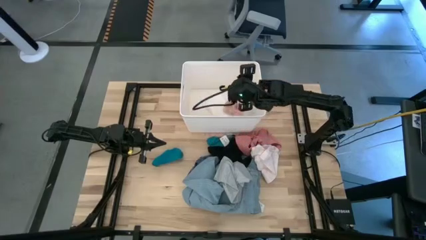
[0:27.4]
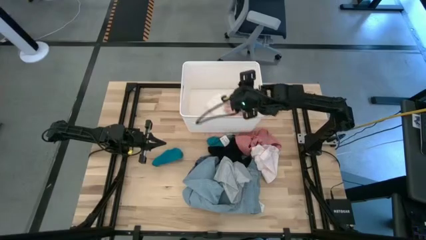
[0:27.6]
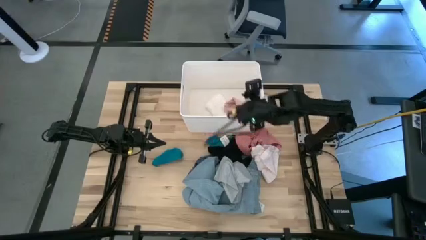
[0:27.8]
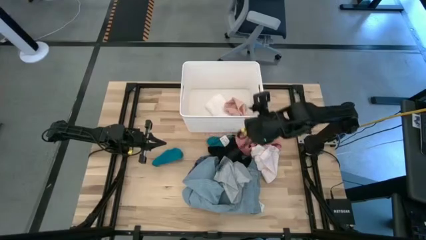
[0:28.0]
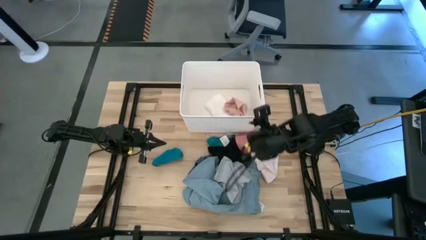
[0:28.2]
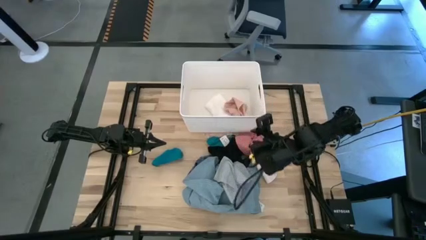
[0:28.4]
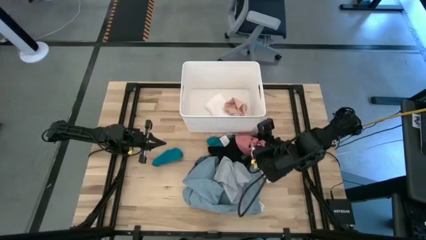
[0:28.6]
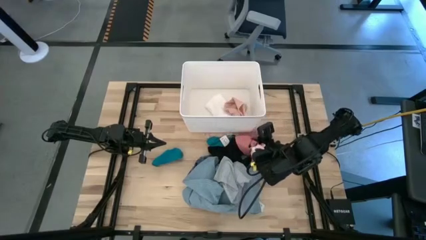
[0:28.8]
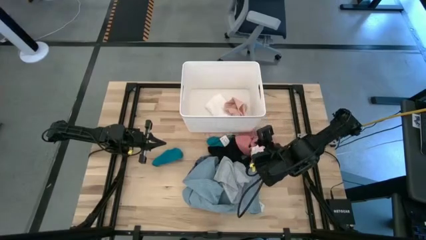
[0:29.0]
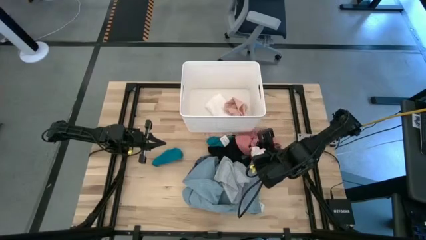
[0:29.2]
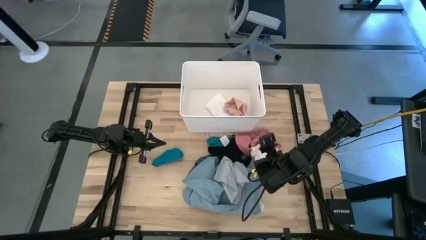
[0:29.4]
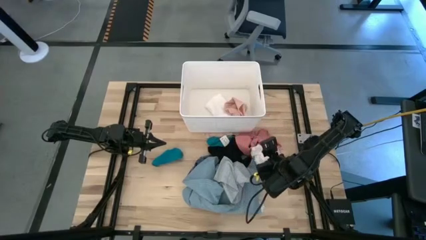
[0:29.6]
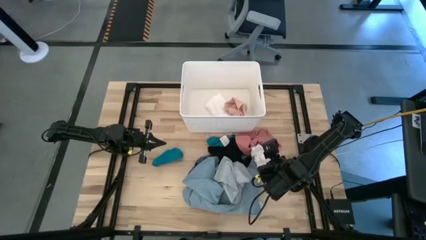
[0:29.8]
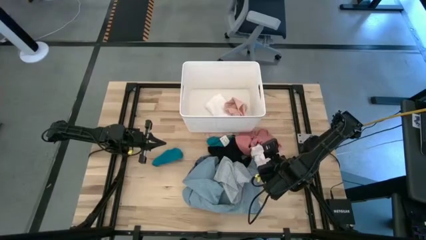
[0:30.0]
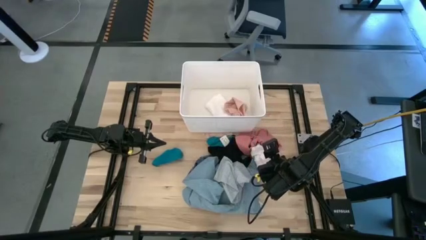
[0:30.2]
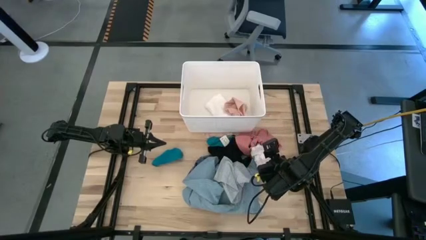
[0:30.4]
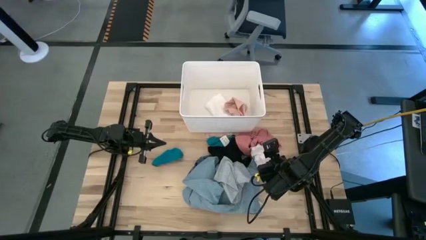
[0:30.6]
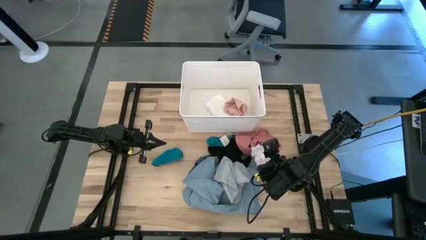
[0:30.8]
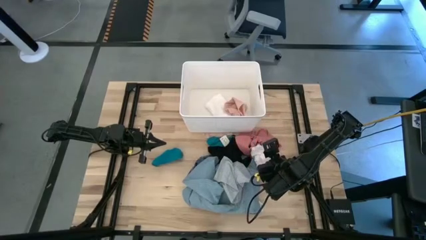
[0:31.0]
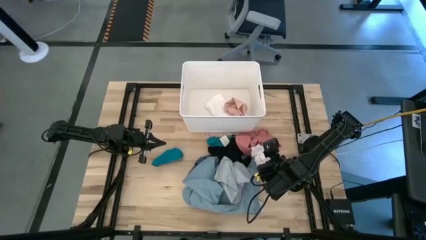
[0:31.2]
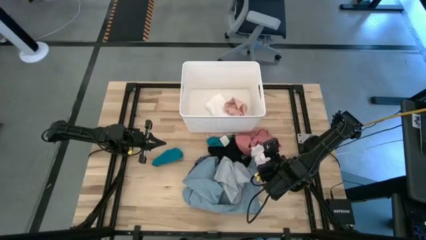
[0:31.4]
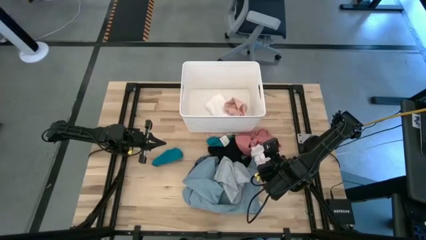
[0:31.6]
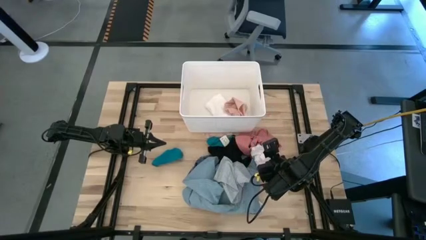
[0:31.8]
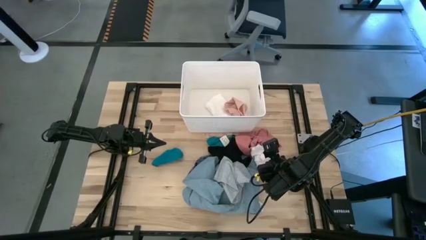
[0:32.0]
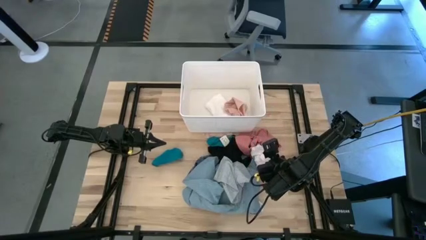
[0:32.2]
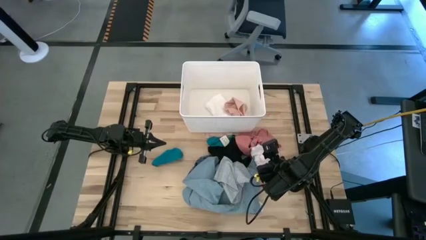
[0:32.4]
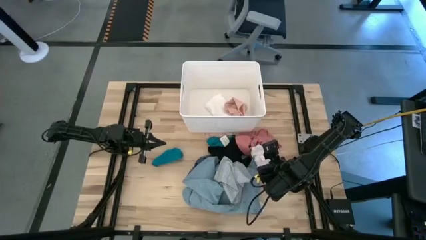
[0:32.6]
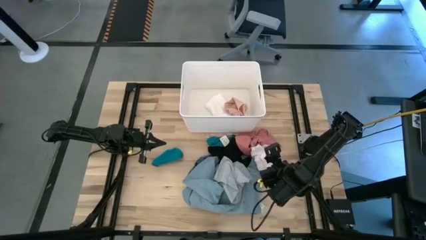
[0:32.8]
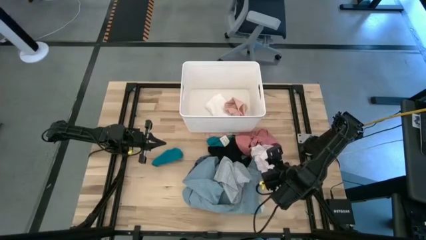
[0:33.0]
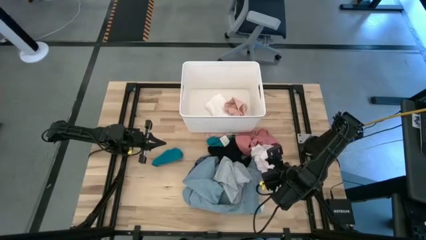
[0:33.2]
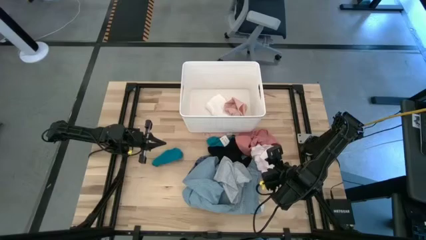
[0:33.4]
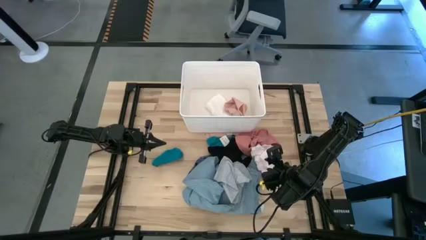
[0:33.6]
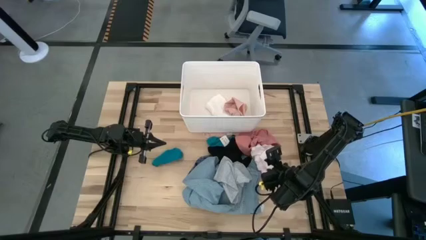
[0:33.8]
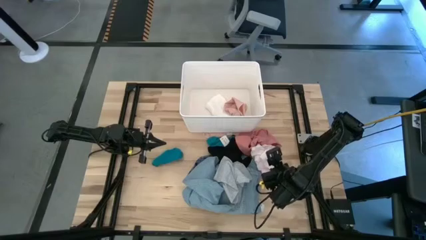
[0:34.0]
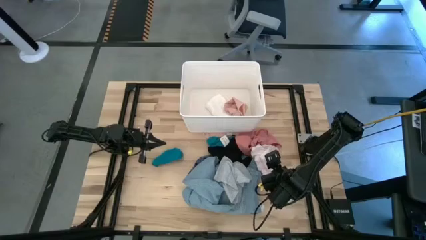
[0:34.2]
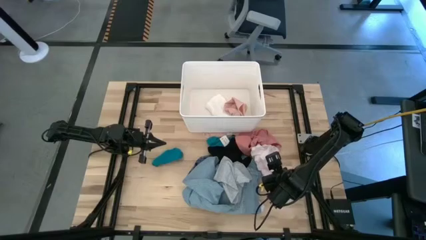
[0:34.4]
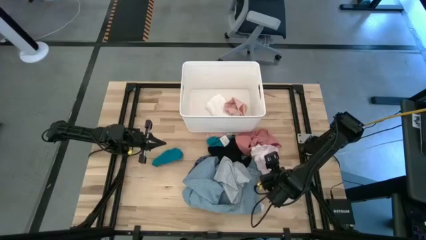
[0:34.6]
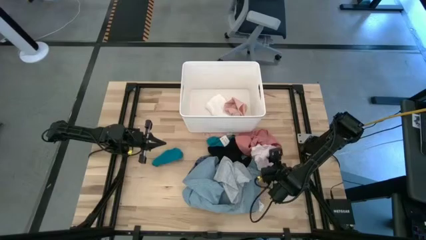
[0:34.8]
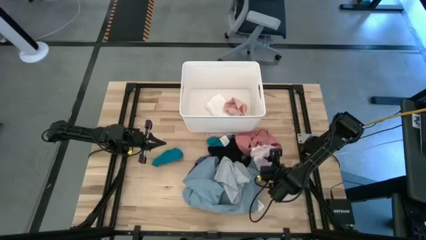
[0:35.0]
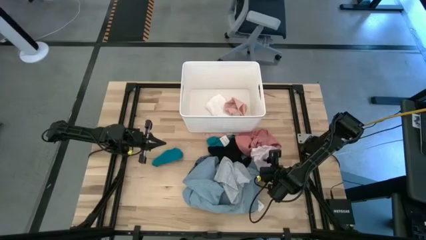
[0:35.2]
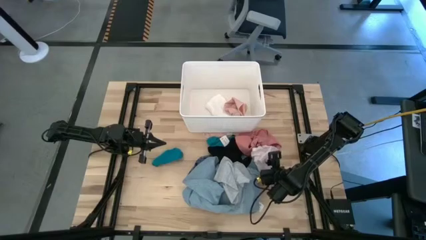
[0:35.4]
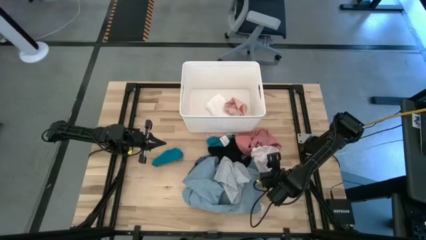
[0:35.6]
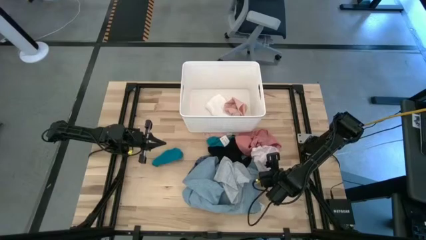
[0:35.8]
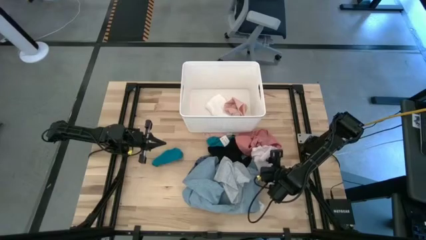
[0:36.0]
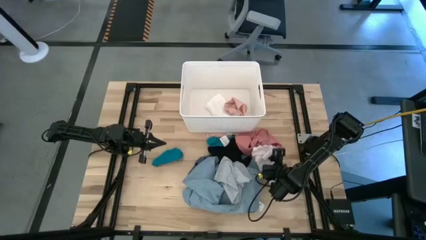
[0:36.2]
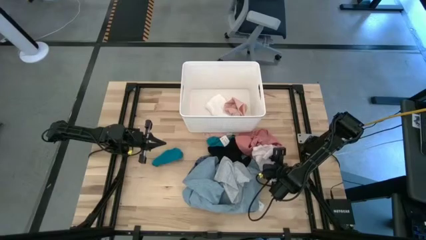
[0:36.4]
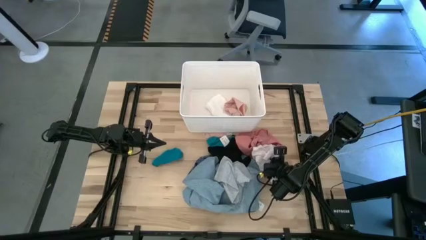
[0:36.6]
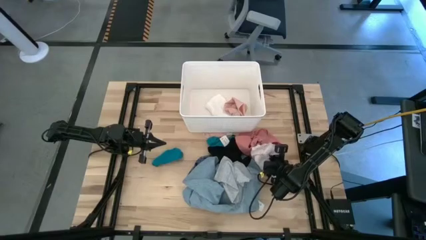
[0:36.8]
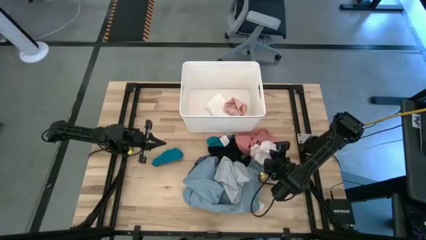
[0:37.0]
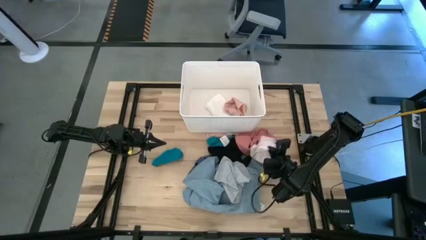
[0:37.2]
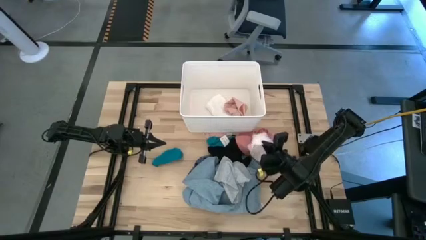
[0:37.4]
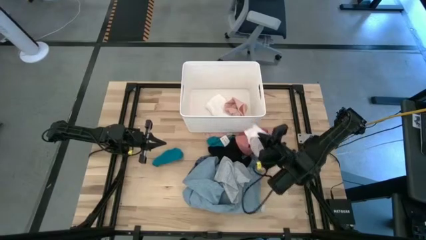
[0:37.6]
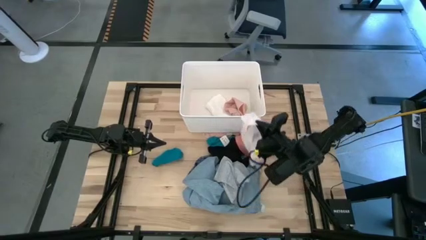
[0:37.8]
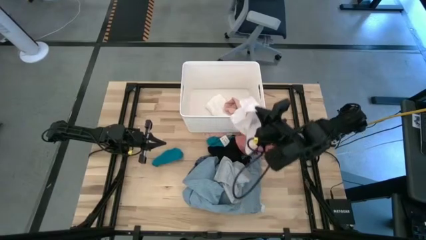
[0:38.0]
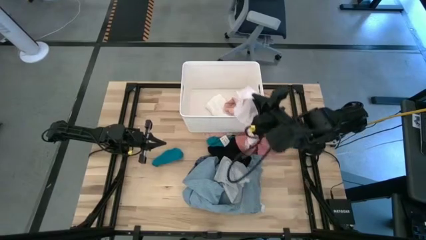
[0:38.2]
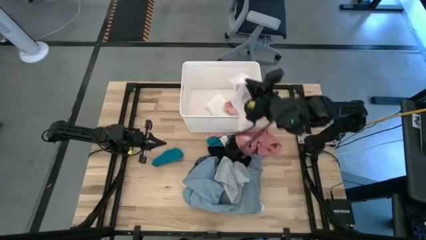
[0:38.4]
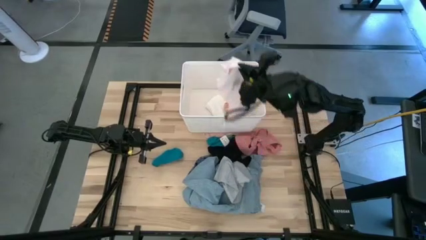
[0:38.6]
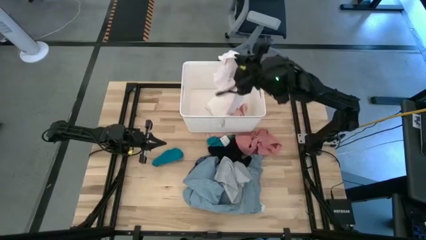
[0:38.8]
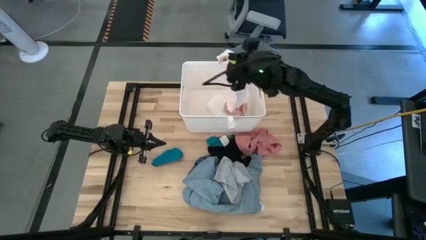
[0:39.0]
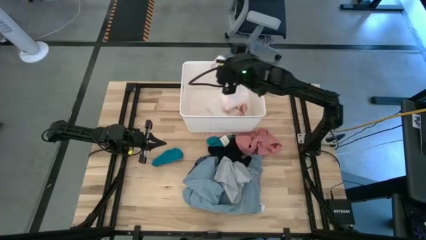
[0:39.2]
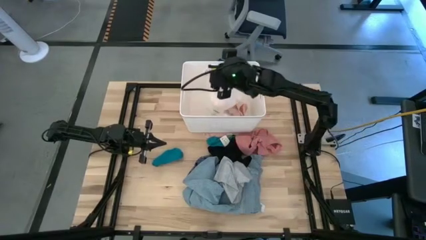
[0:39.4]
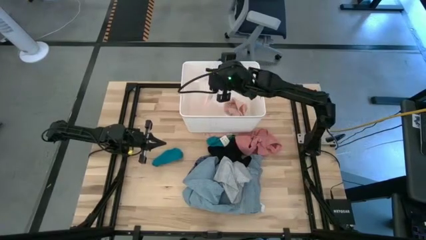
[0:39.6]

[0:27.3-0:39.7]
Task: Sort clothes
Put the white underwear into the white laundry bin

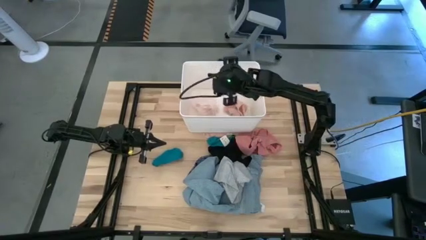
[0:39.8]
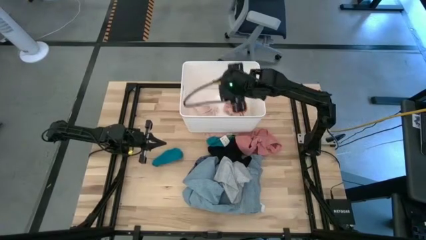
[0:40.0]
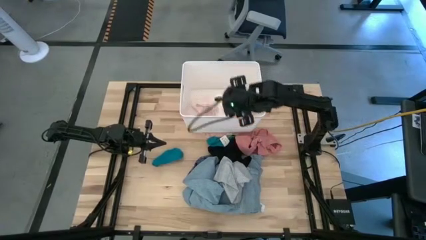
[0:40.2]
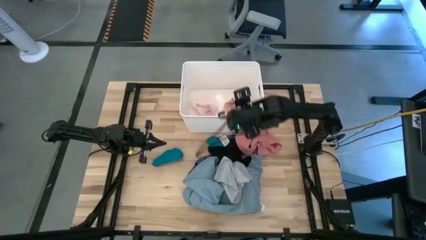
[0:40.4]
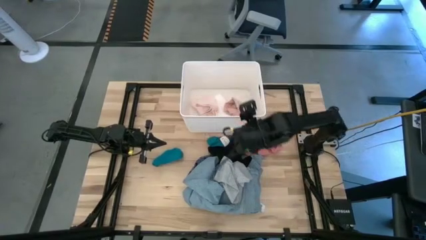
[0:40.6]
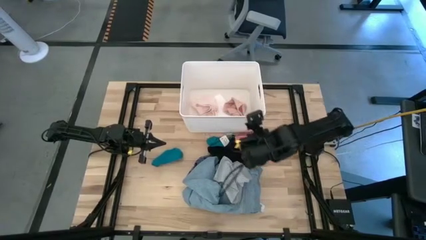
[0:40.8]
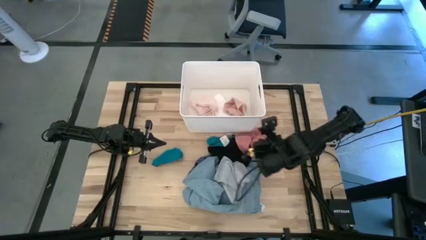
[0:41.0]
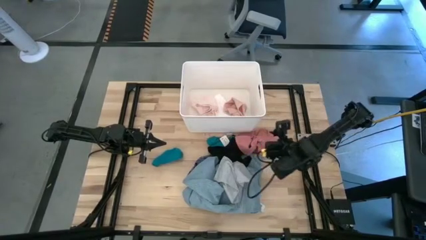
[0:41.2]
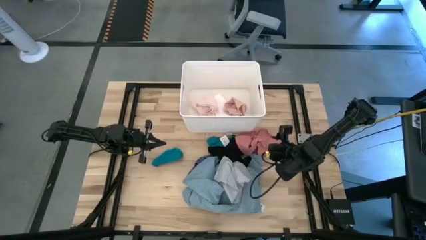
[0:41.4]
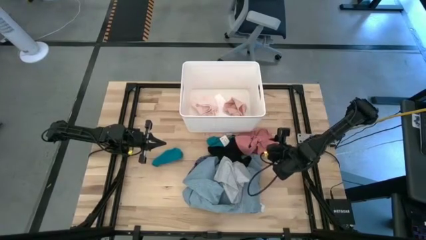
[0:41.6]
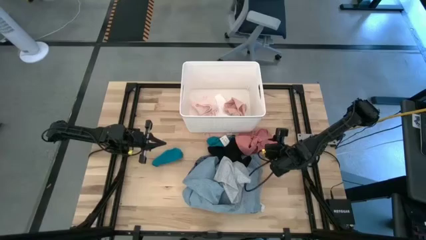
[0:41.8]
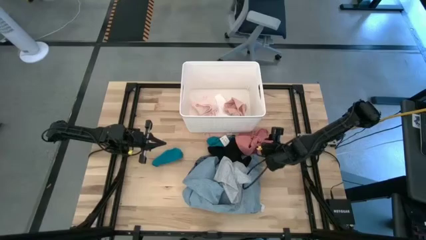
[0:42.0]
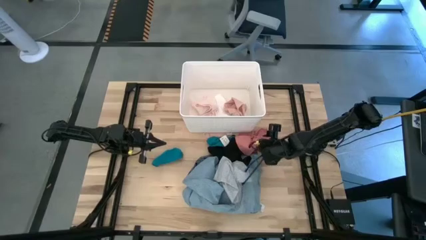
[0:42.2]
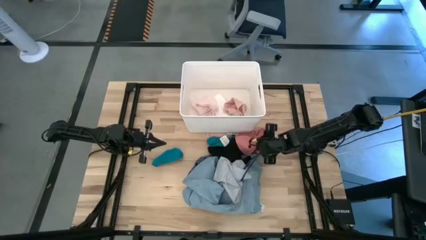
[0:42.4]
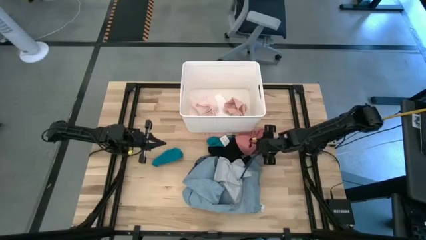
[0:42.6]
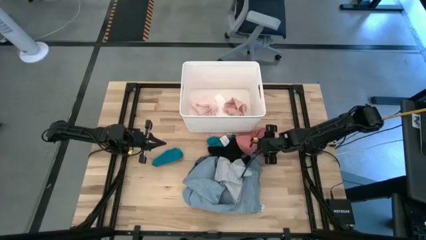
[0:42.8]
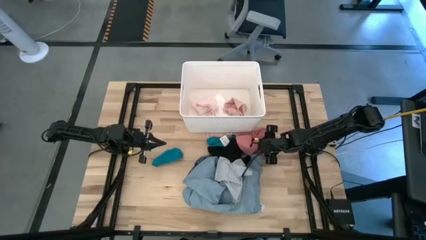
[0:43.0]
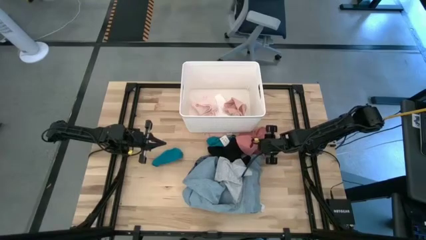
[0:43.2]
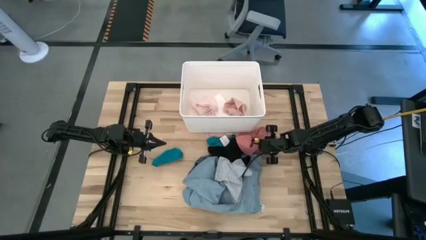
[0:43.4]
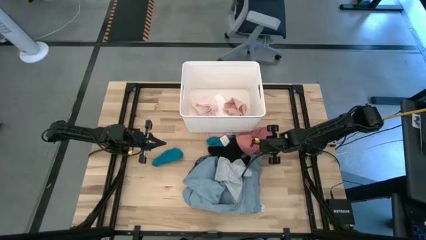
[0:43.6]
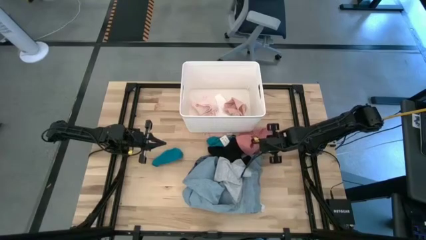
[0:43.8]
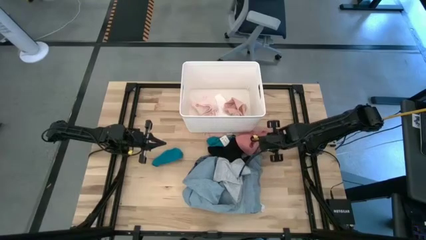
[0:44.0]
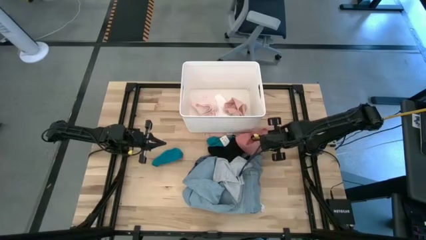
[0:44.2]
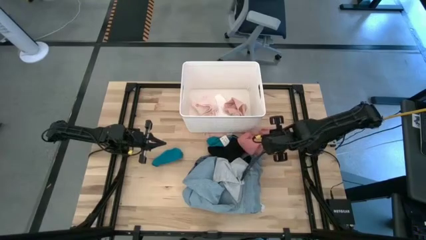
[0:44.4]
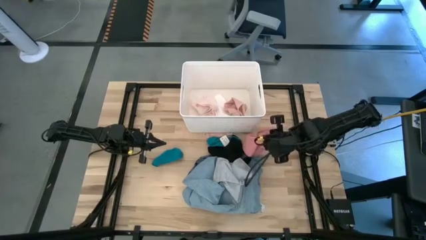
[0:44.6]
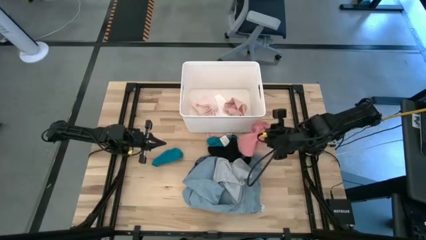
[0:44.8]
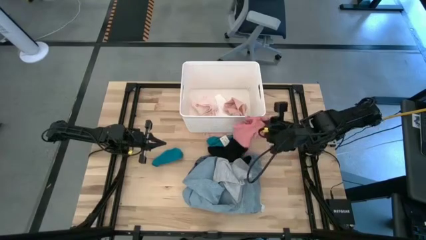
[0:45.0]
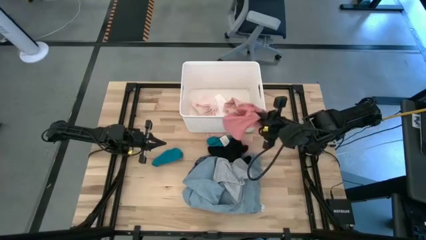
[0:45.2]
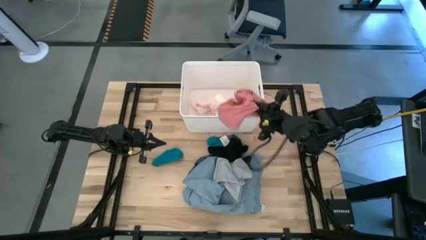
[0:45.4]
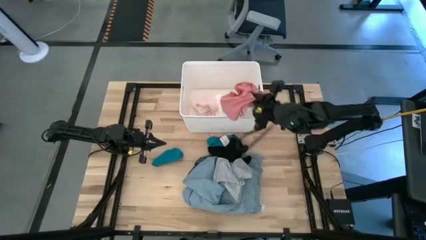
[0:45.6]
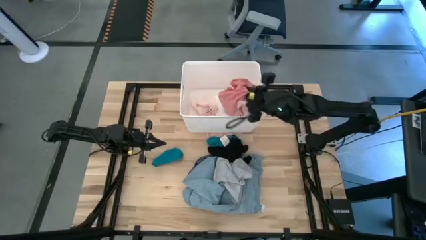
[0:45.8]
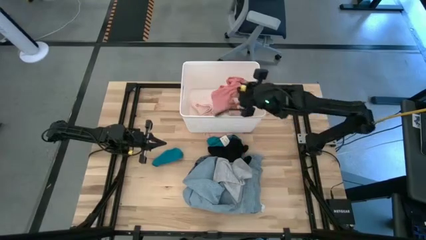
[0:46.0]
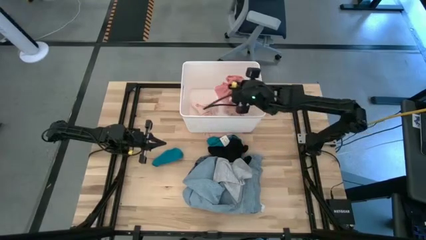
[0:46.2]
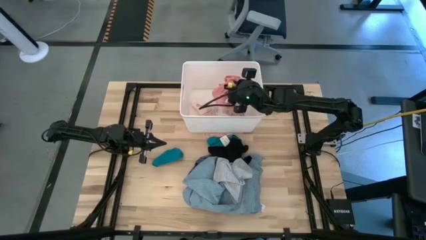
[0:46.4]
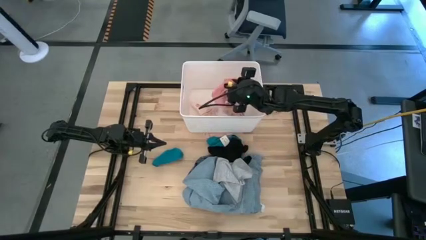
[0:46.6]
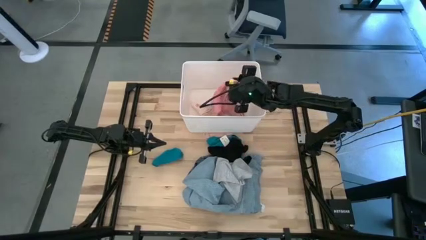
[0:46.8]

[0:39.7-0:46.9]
Put the pink underwear into the white laundry bin
